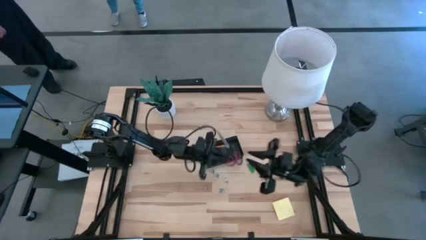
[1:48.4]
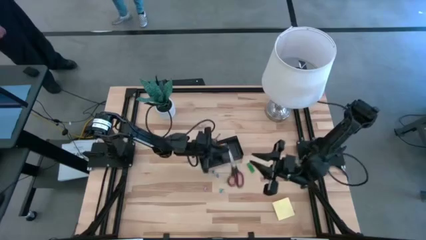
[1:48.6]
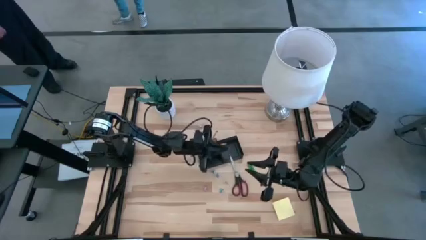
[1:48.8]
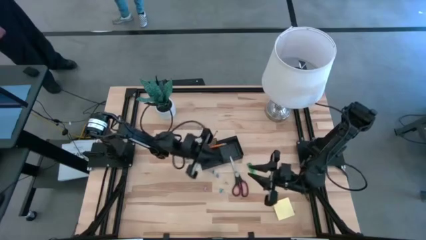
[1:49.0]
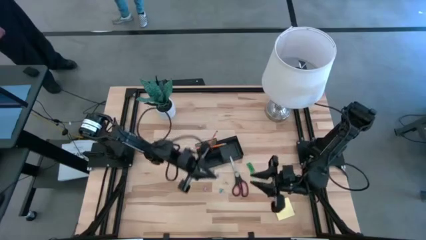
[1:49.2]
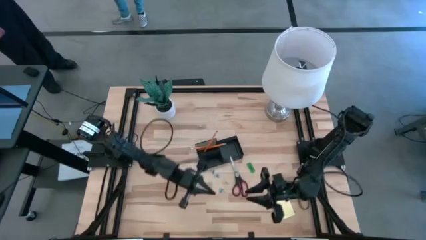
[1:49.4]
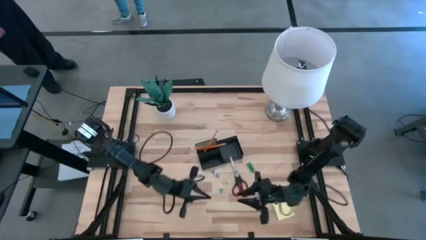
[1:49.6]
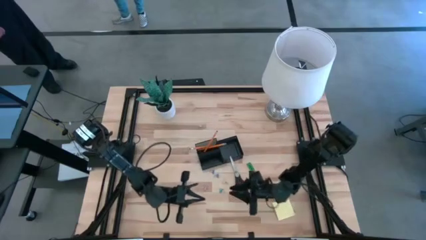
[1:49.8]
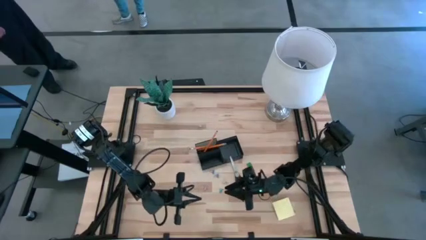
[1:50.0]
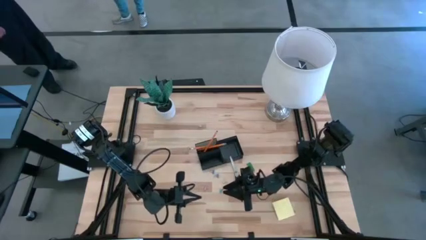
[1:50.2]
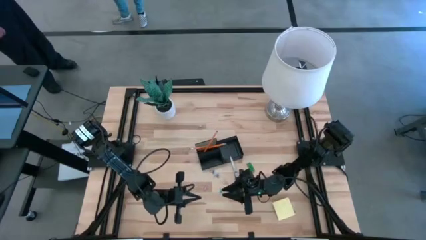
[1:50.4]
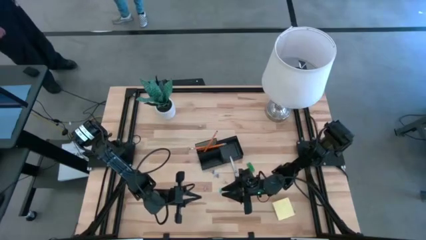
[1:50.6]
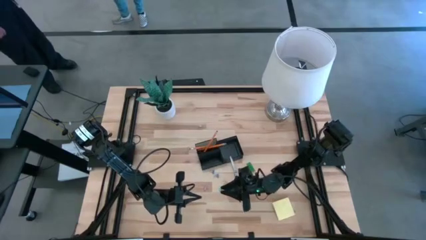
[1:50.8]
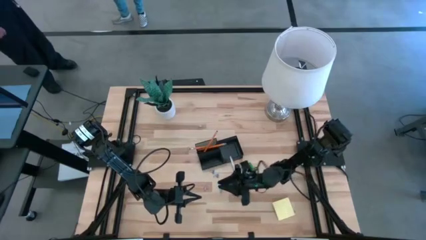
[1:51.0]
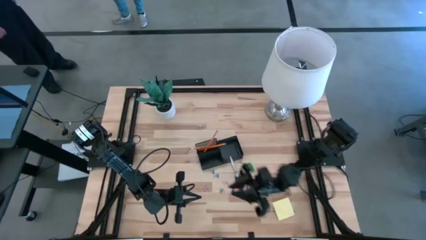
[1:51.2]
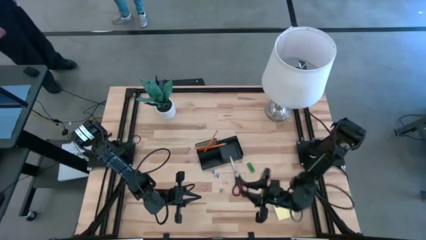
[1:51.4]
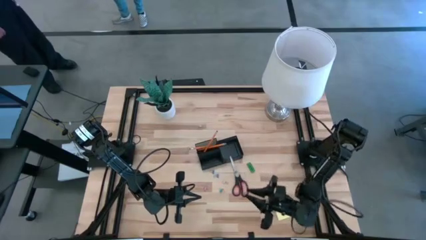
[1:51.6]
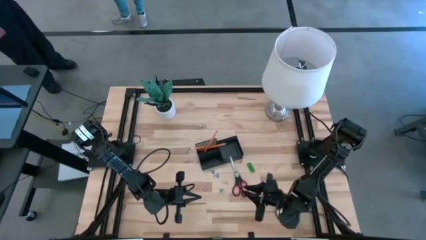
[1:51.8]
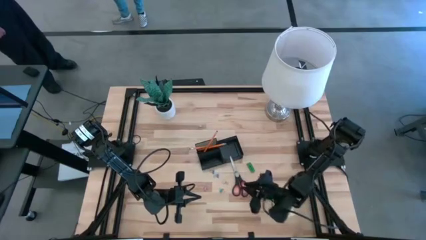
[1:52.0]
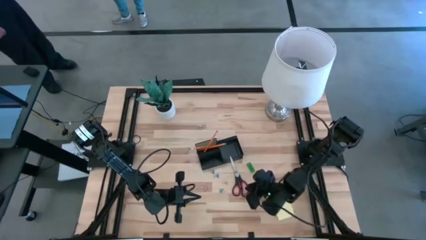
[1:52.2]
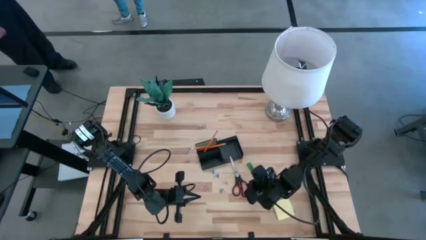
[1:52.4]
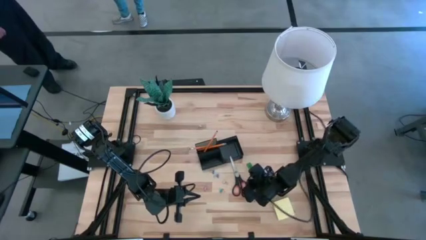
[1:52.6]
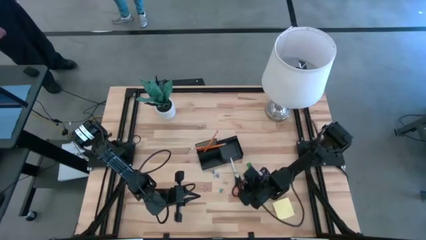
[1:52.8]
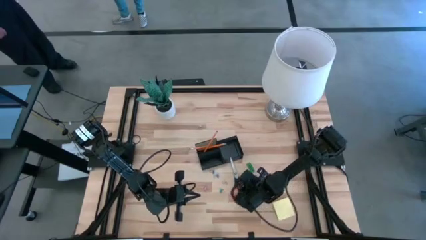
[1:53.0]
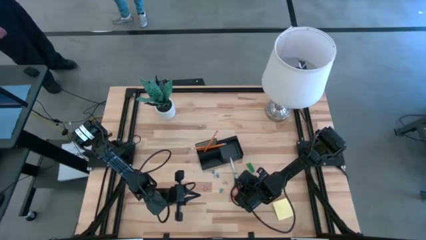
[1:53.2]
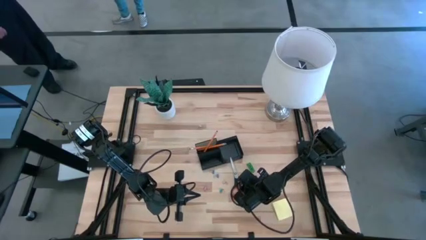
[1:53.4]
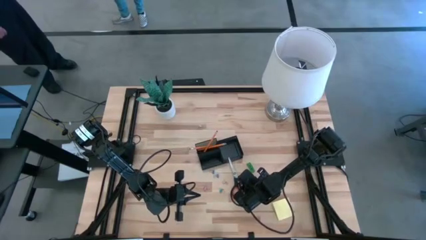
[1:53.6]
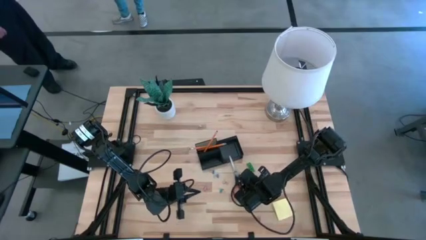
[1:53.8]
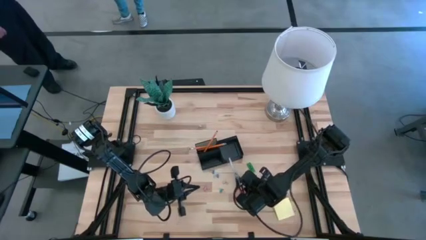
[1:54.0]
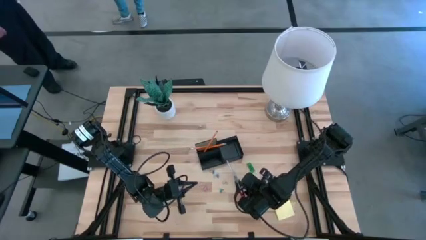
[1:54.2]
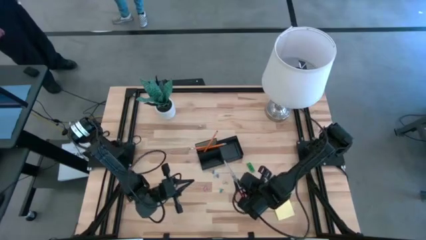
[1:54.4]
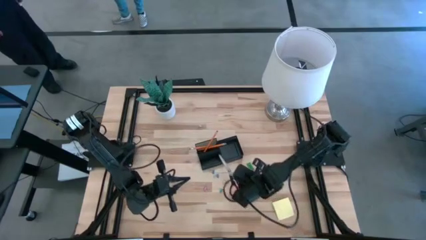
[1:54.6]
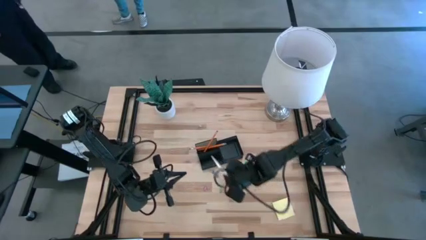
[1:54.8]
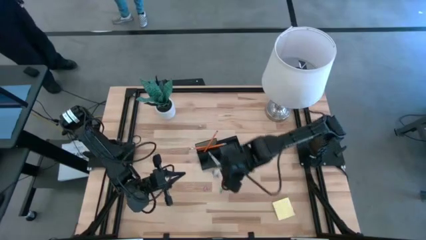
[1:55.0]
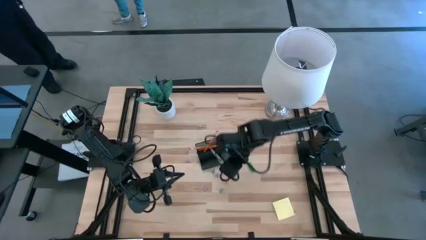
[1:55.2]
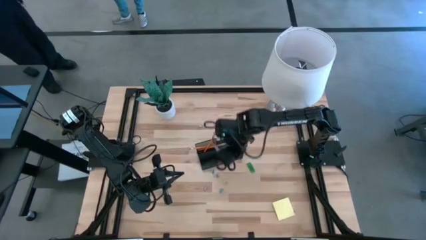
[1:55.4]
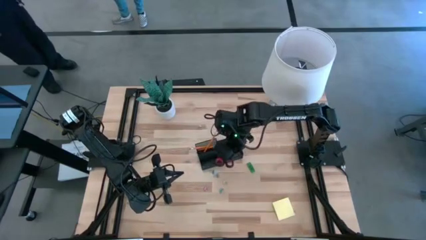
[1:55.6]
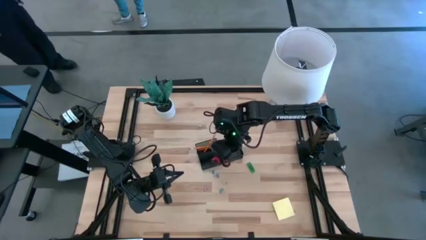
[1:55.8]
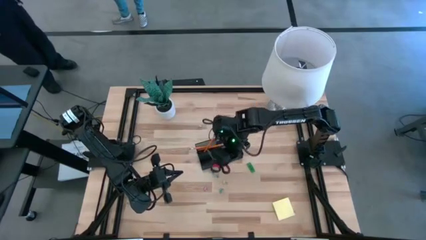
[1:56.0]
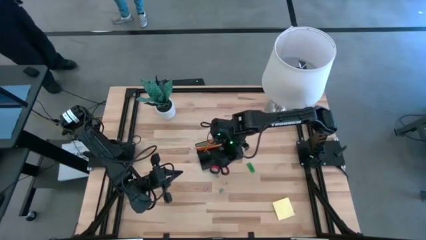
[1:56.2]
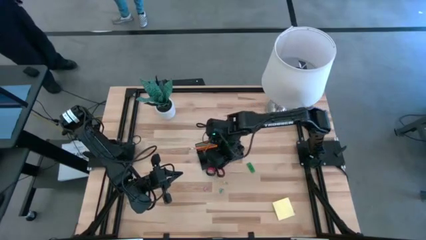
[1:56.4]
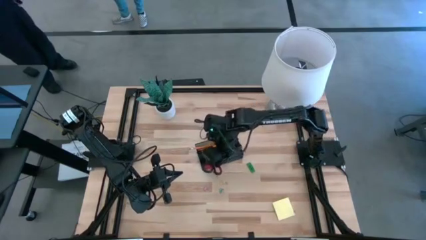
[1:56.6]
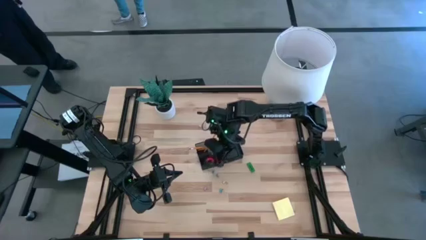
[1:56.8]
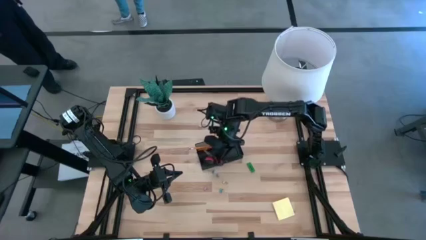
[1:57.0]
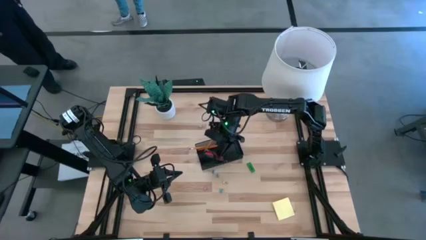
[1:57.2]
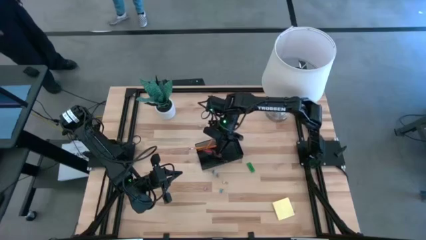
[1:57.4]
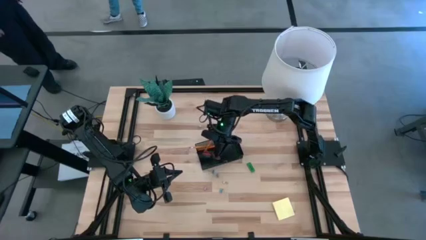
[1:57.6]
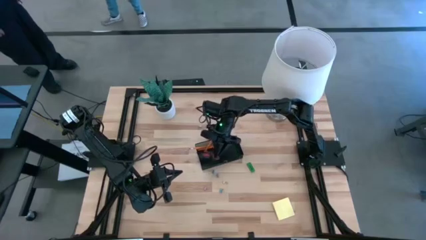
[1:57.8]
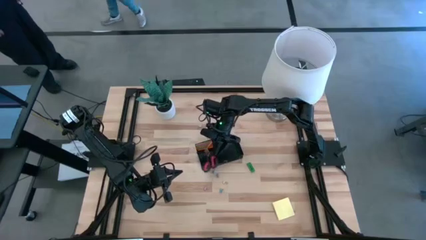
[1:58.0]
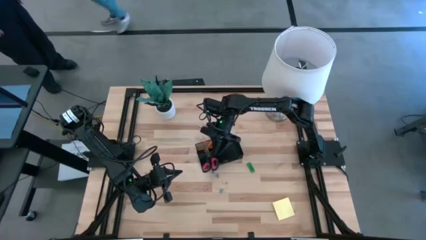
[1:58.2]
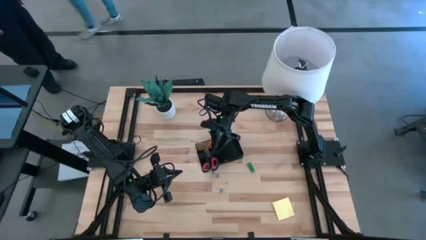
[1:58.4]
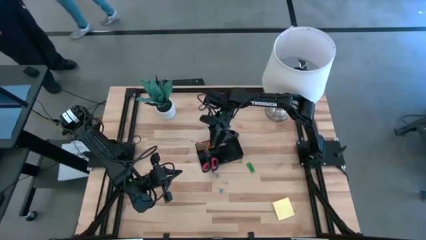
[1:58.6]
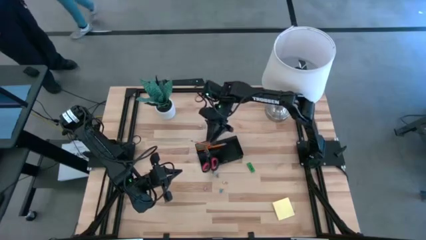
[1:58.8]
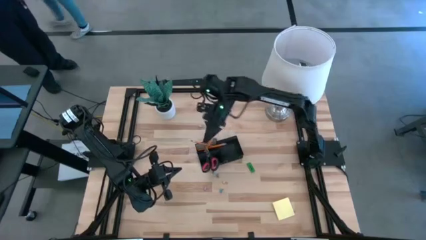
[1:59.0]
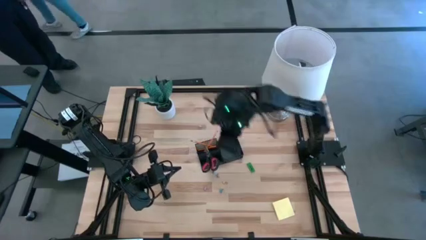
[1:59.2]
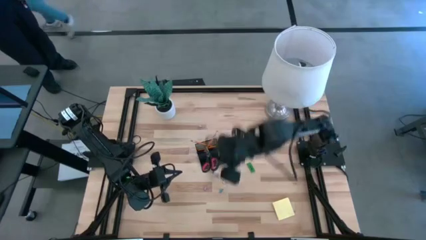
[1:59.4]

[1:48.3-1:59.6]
Task: Pick and place office supplies into organizer
Put the black scissors into the black desk organizer

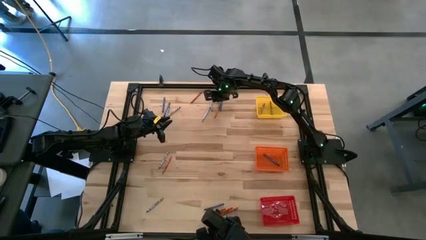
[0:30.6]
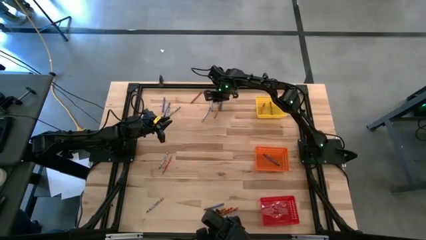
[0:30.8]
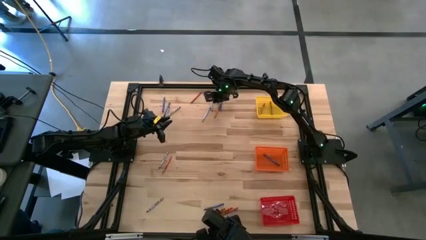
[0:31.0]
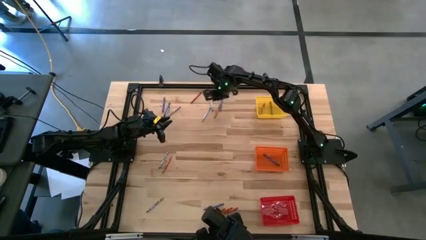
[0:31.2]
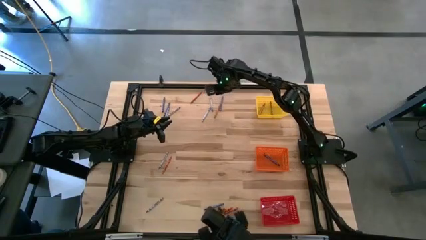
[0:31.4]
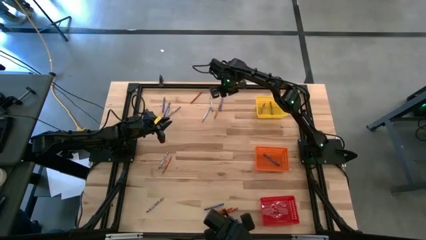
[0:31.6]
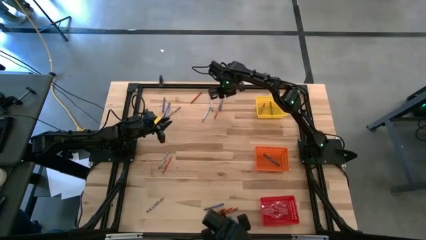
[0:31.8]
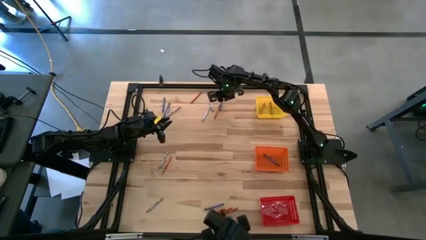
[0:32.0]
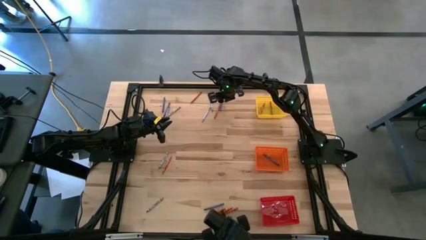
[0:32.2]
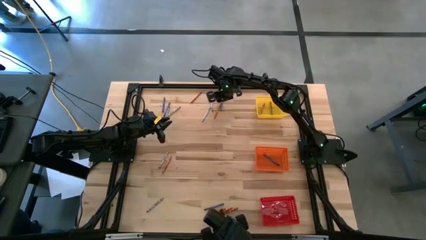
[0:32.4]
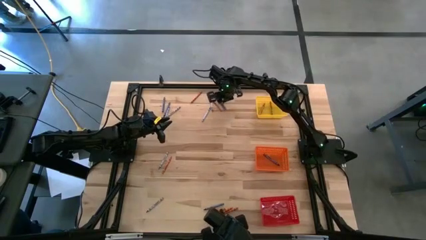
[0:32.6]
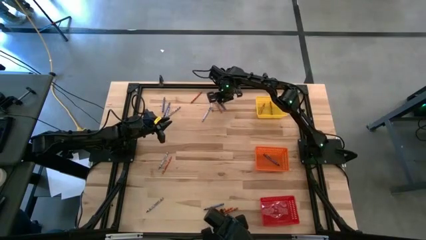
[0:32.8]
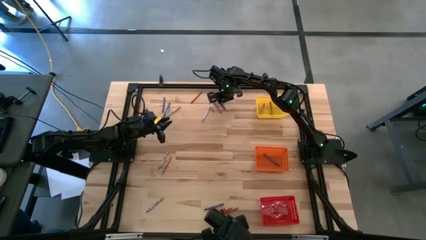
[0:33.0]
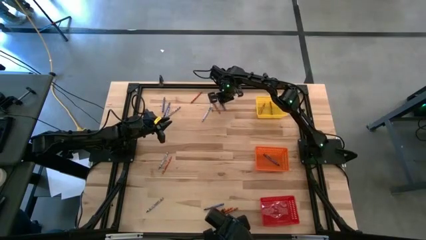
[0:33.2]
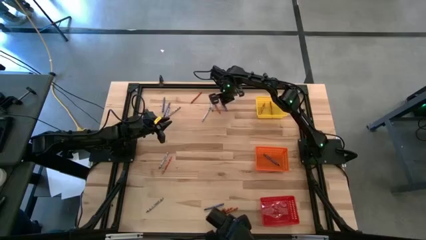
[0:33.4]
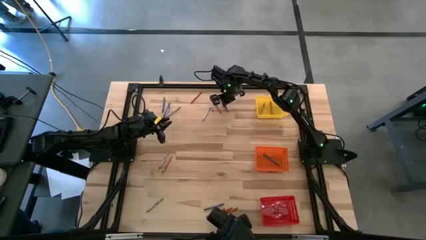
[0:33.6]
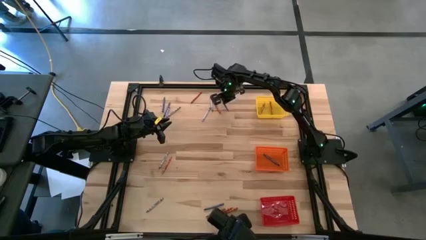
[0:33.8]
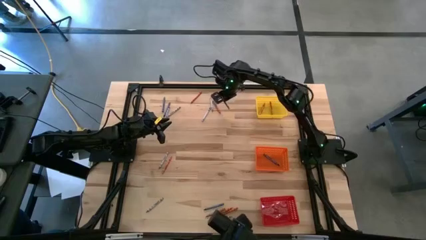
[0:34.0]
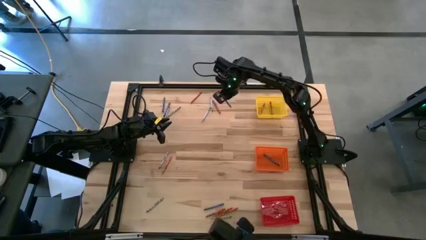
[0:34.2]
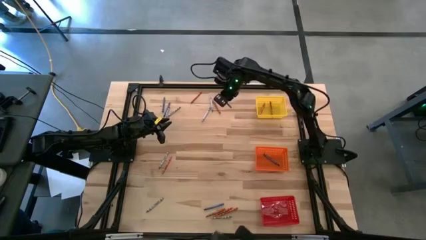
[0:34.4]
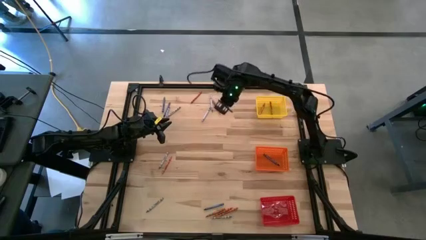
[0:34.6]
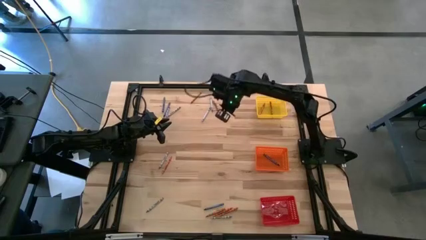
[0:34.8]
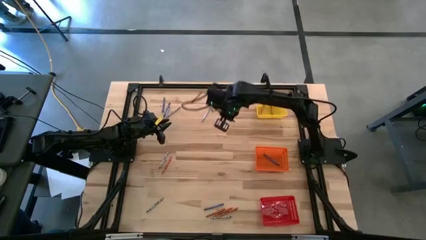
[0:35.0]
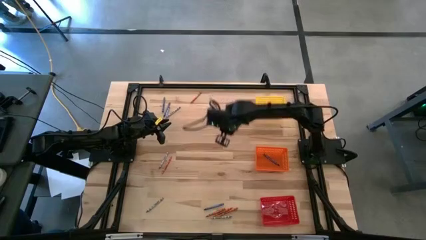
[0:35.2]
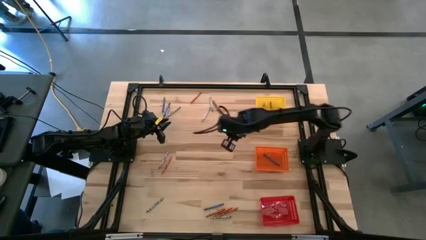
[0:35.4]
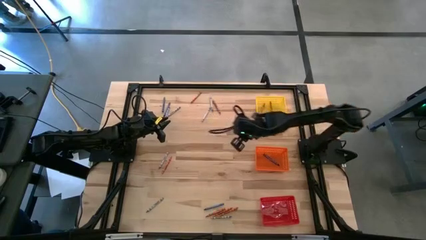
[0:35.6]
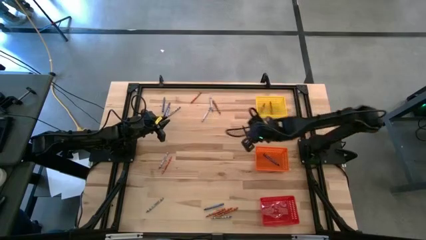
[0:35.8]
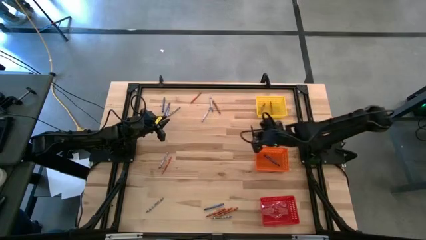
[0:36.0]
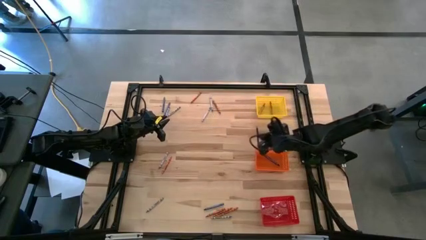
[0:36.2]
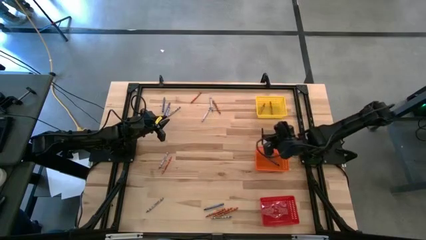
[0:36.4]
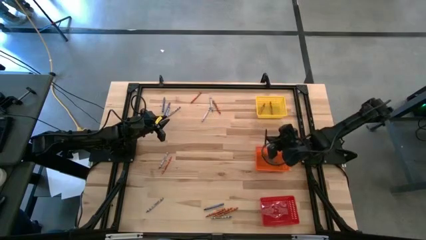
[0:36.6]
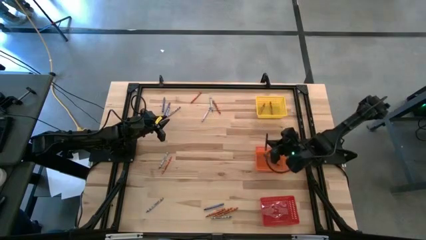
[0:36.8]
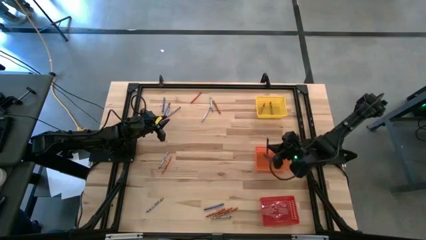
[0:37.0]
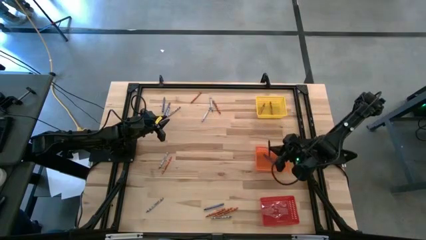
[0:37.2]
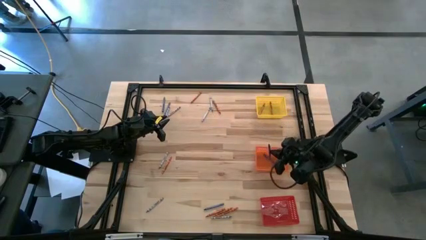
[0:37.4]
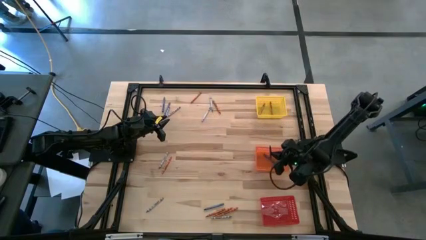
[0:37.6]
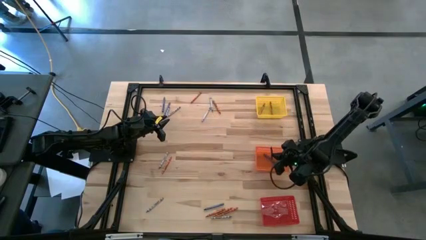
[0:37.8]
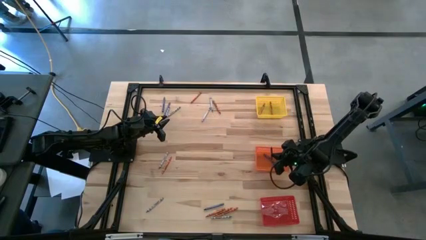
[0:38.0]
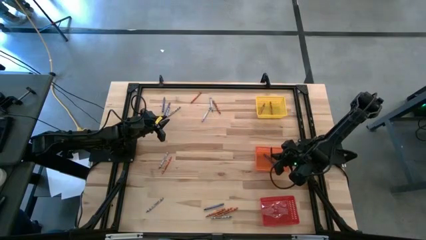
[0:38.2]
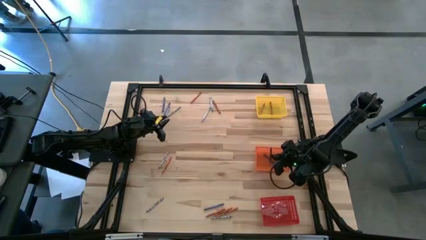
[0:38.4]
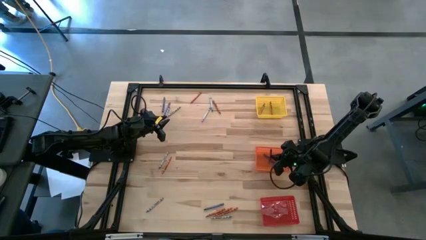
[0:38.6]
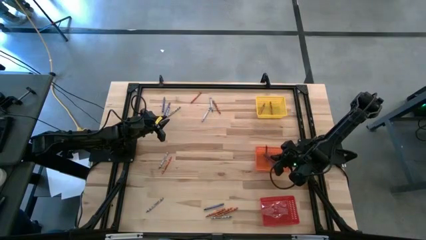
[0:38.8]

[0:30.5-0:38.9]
Task: Sort crayons
Put the blue crayon into the orange bin
